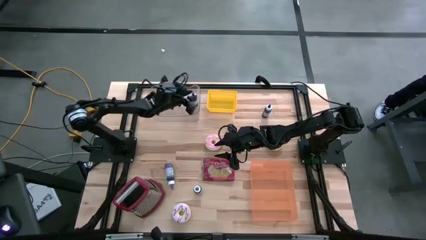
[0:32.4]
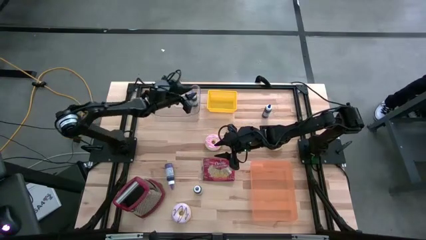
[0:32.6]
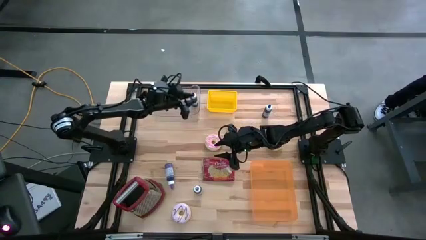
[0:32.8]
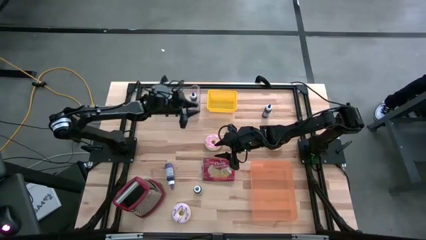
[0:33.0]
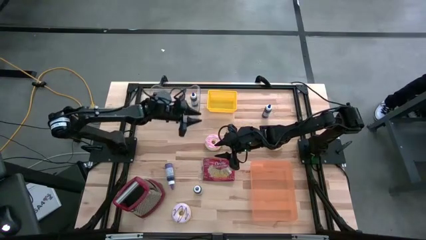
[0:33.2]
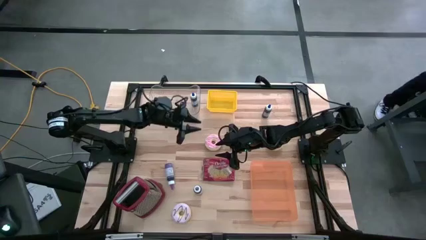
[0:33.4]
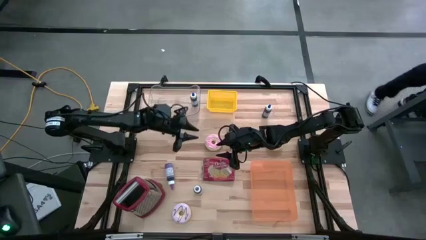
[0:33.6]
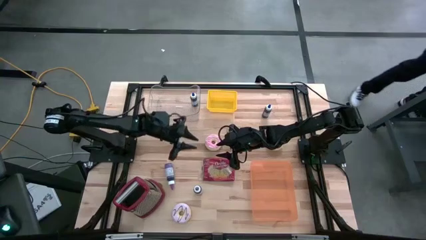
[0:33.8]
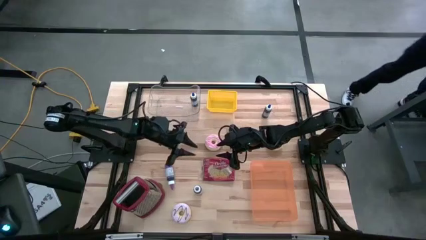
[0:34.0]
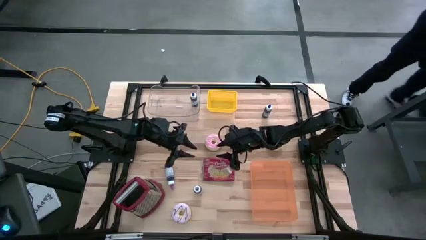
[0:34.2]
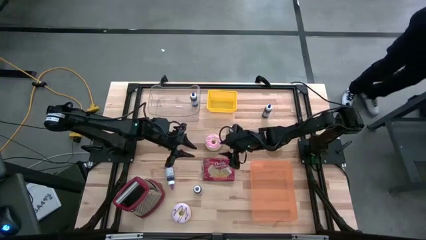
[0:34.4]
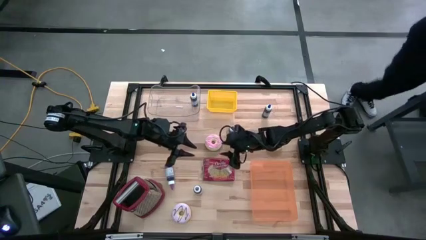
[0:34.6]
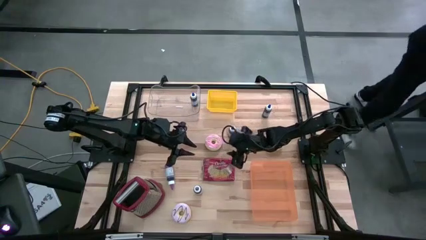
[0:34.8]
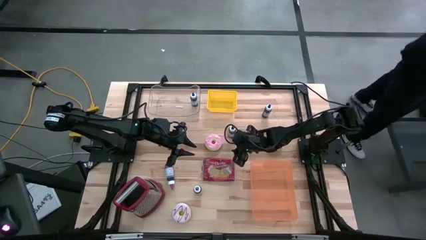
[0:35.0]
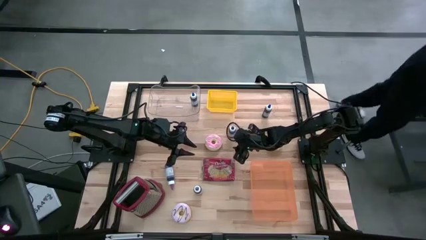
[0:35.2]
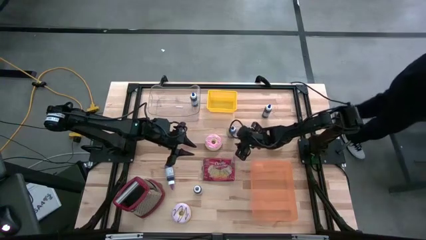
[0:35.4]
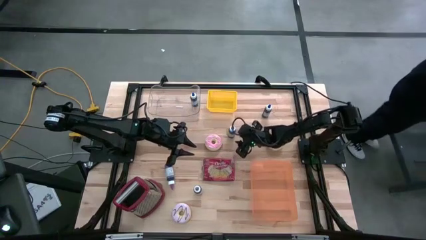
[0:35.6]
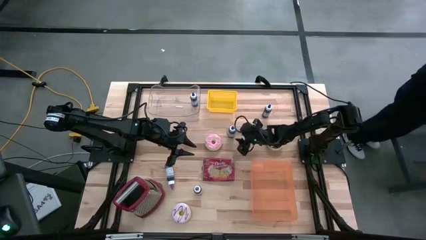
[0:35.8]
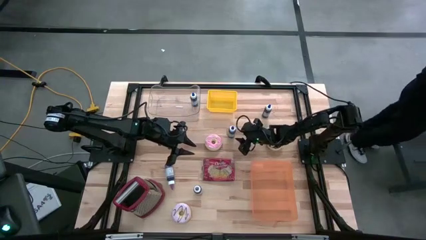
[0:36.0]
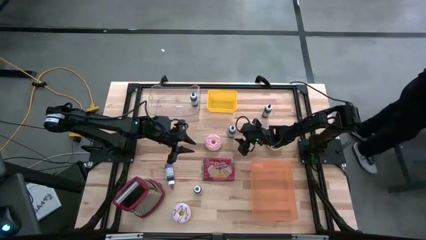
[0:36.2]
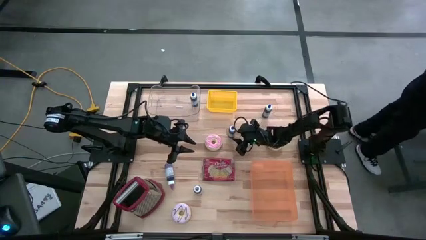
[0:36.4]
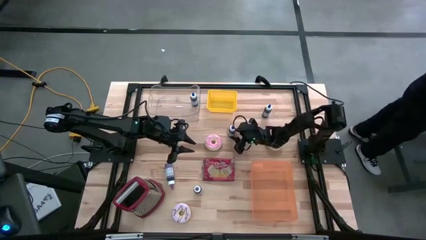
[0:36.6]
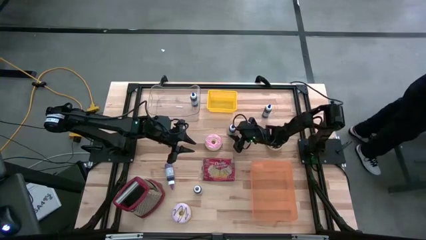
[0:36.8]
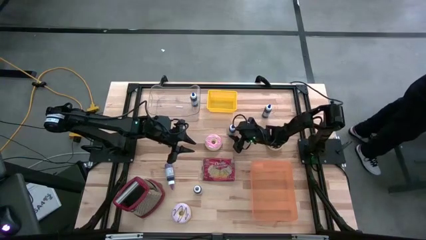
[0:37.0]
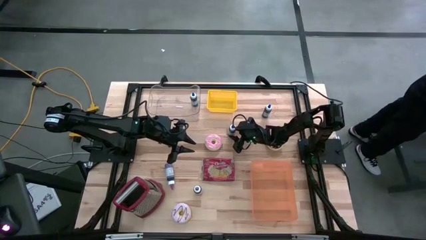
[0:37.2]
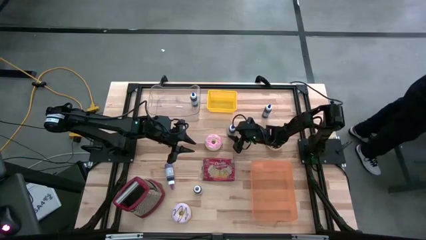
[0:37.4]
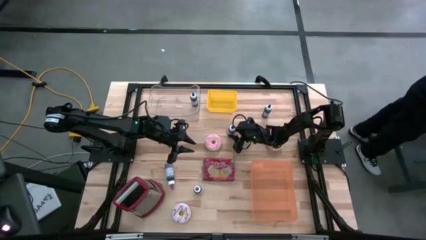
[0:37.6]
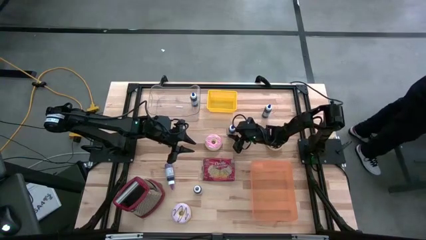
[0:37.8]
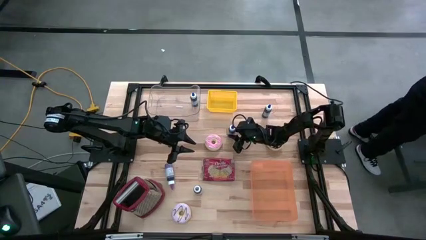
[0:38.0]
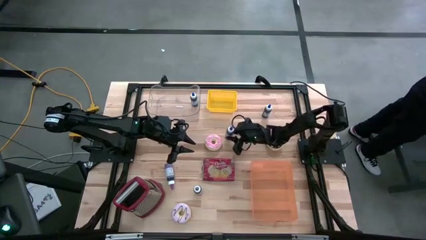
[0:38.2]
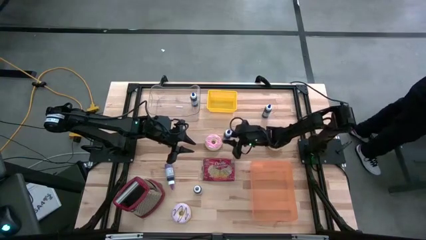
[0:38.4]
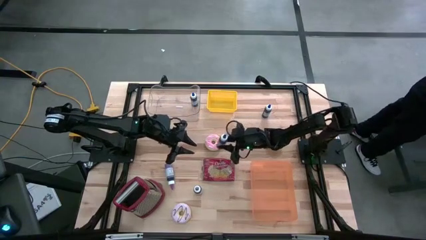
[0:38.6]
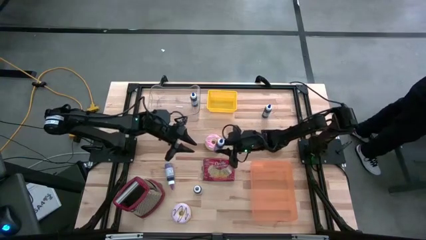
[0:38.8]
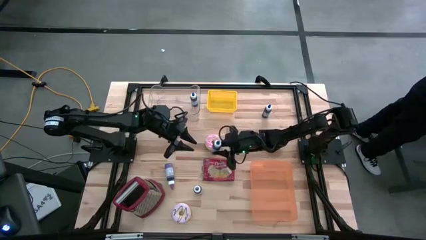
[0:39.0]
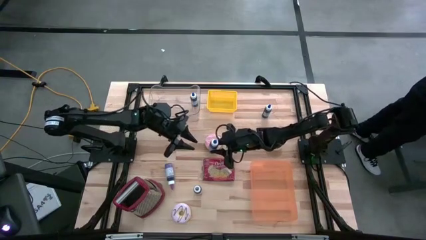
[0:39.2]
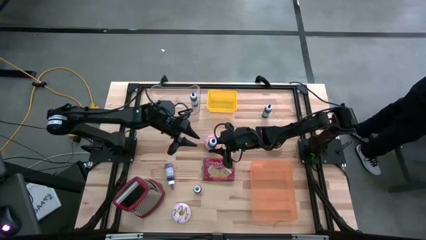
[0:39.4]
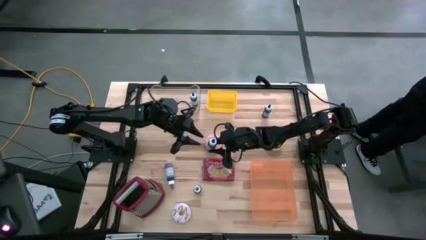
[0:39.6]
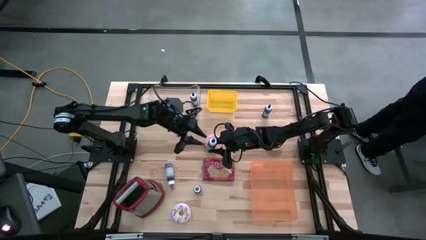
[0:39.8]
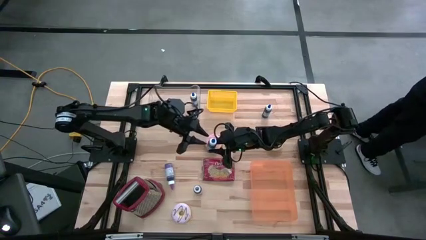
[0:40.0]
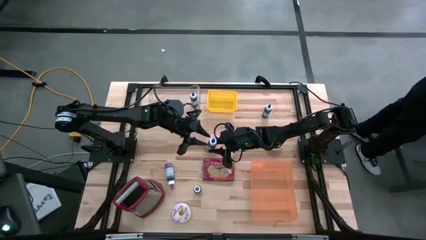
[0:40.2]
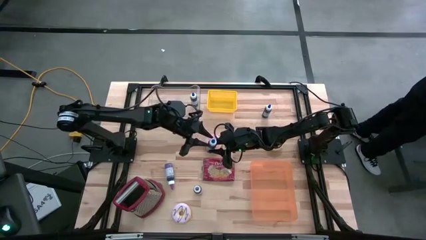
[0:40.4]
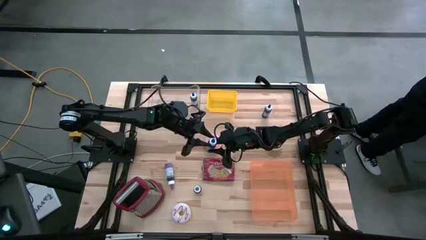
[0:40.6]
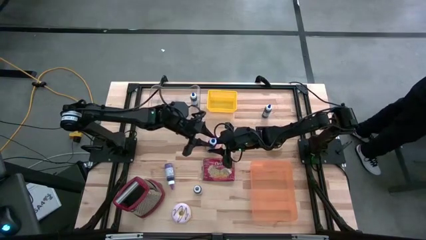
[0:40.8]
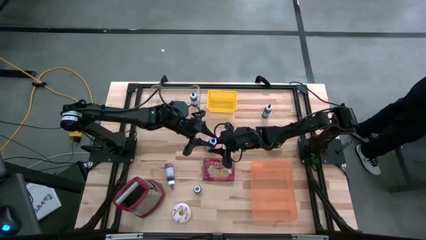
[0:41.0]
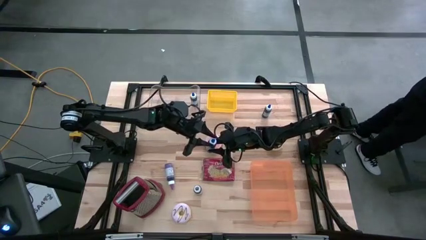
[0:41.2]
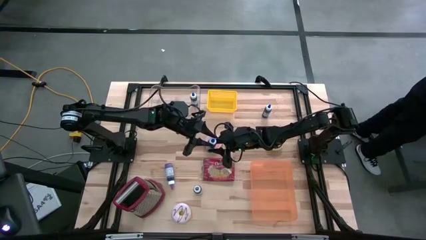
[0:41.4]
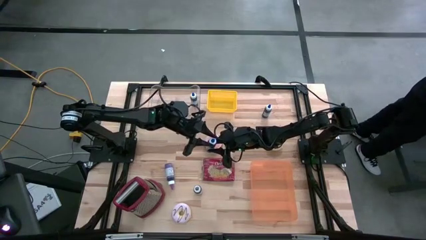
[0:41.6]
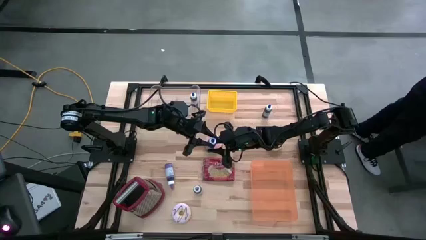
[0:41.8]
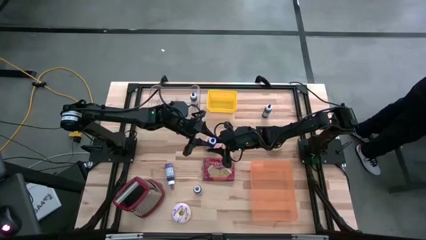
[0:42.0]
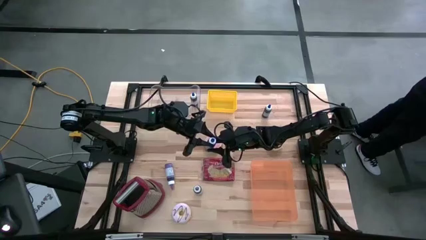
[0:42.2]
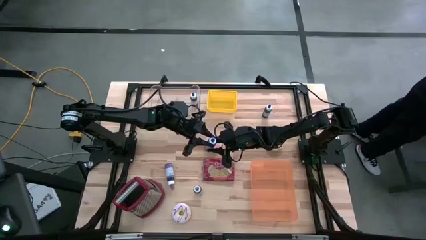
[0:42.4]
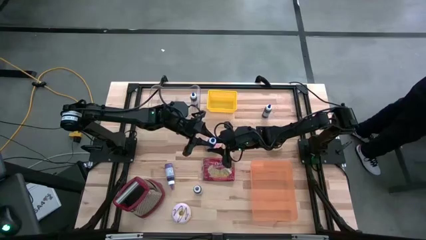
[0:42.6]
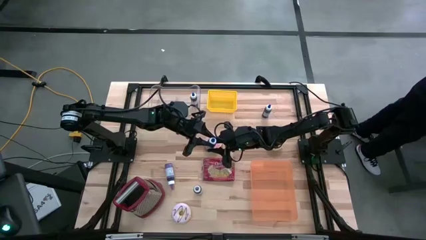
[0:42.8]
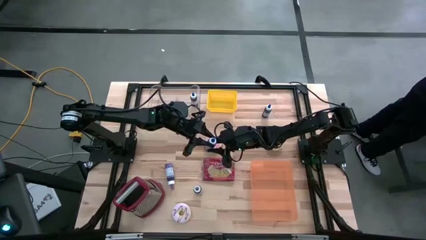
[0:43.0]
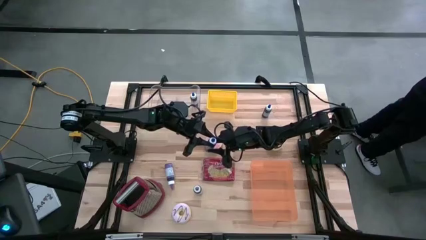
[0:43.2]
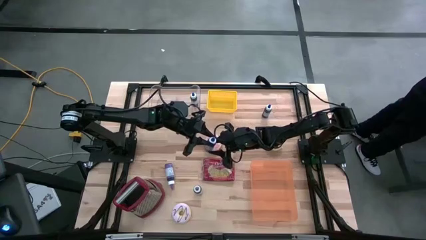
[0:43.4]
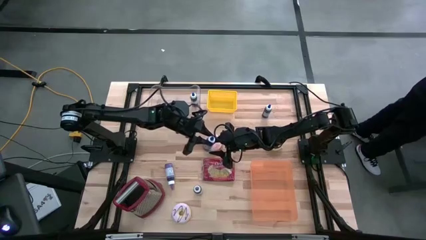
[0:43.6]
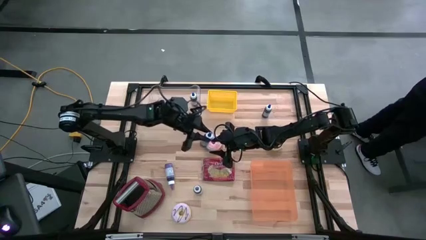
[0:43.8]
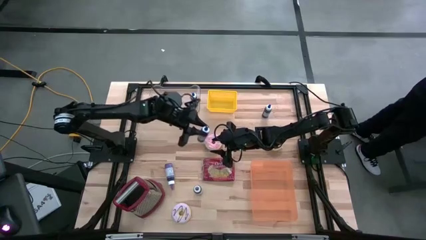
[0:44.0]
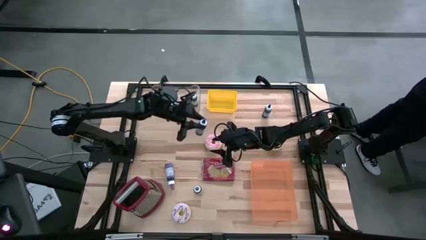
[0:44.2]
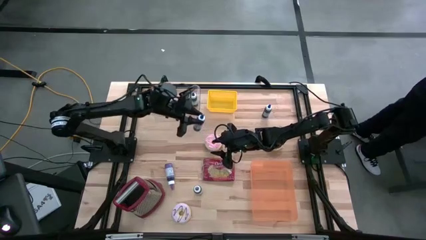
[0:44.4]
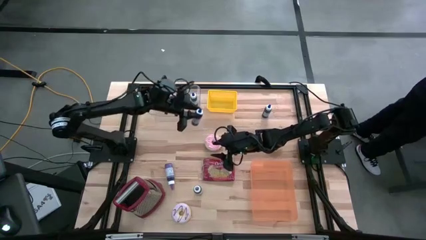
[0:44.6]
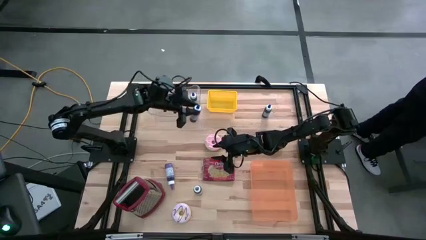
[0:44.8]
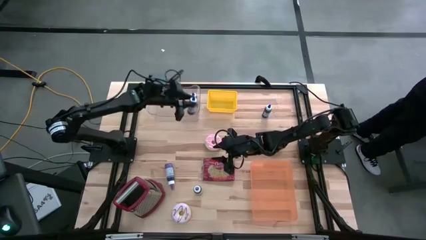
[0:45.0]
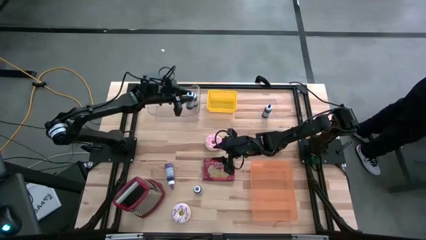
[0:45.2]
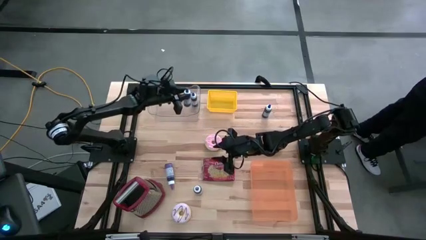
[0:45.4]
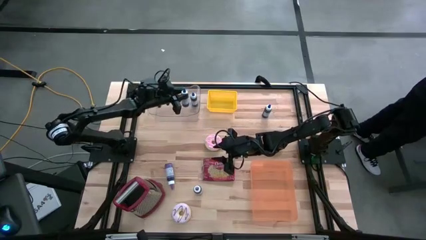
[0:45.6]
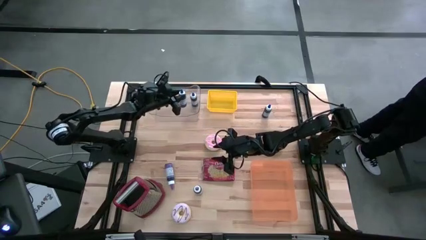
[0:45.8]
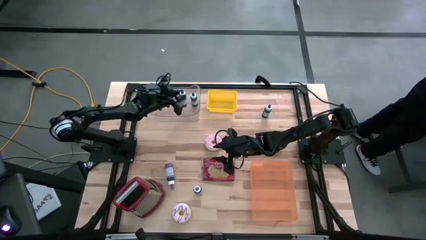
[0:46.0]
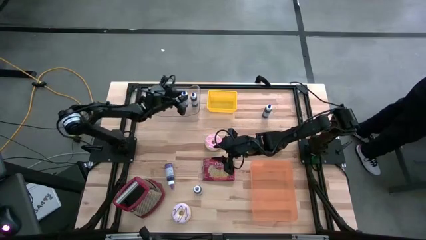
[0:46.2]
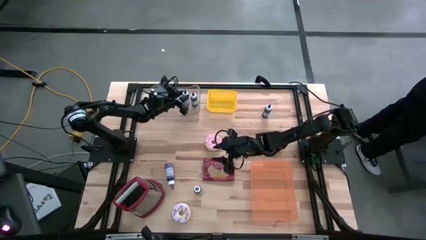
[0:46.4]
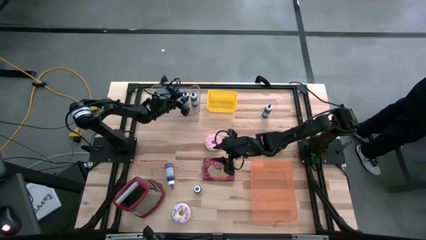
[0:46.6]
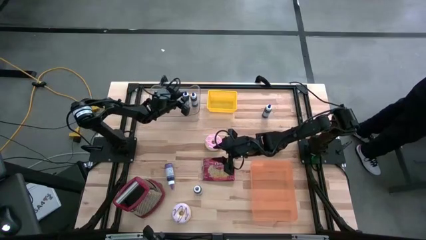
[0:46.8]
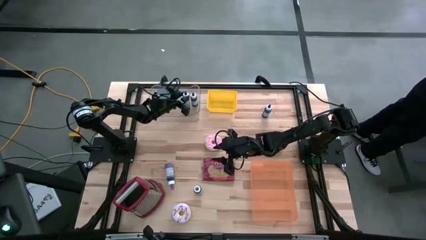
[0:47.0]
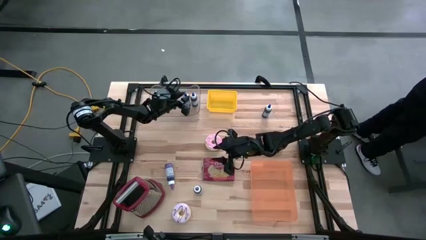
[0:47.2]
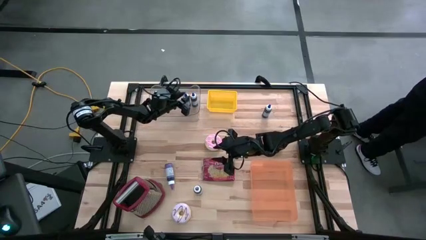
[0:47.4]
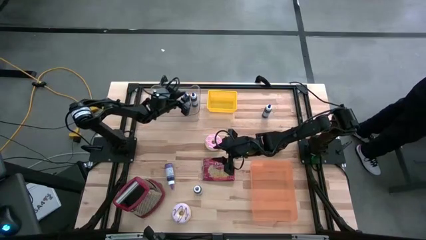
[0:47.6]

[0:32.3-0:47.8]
Put the left blue food coloring bottle into the transparent bin
